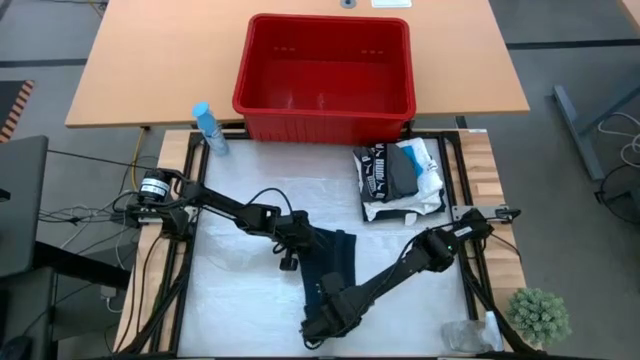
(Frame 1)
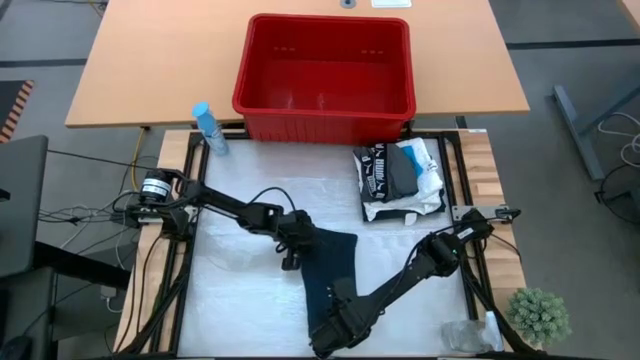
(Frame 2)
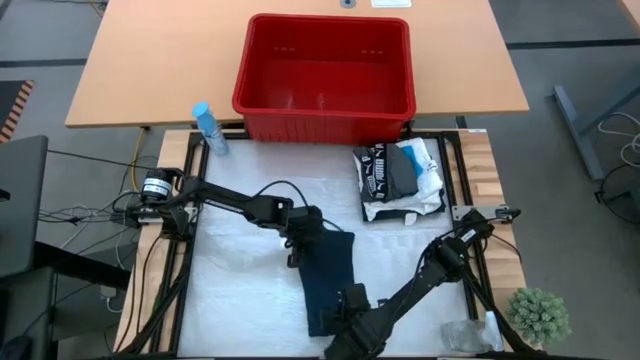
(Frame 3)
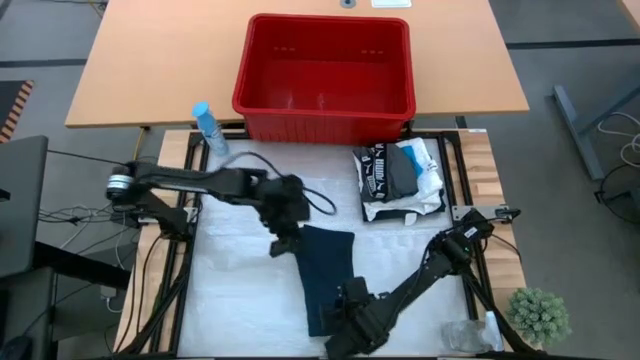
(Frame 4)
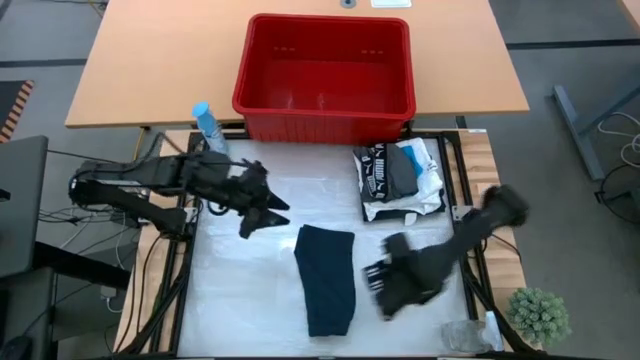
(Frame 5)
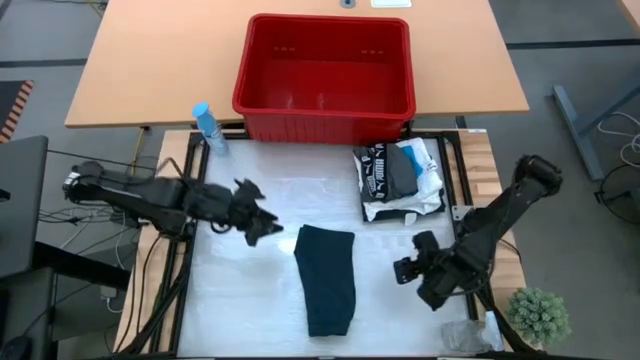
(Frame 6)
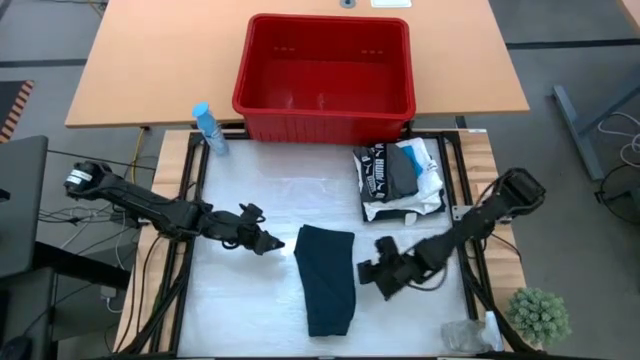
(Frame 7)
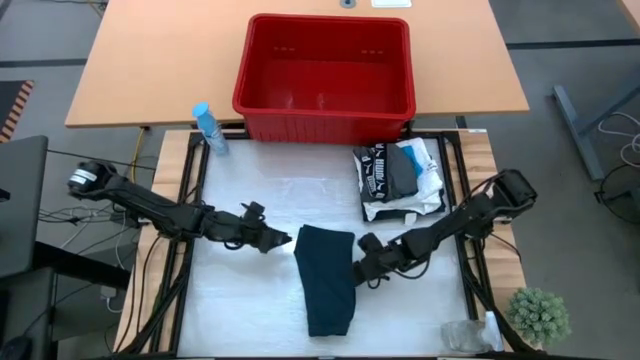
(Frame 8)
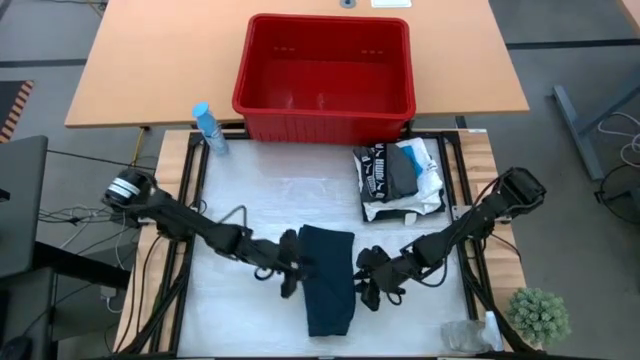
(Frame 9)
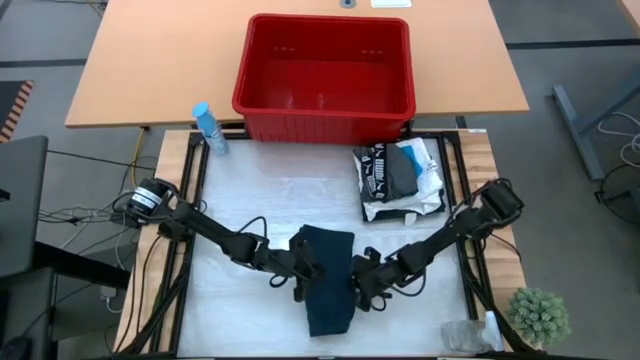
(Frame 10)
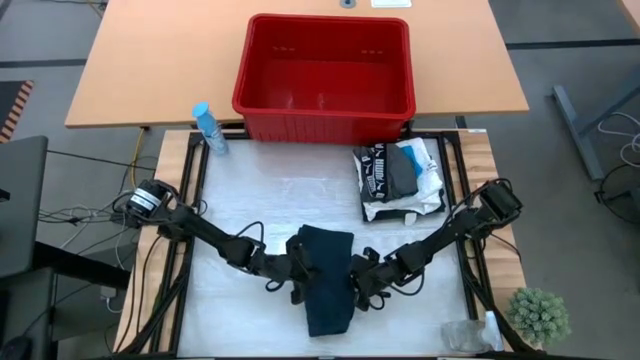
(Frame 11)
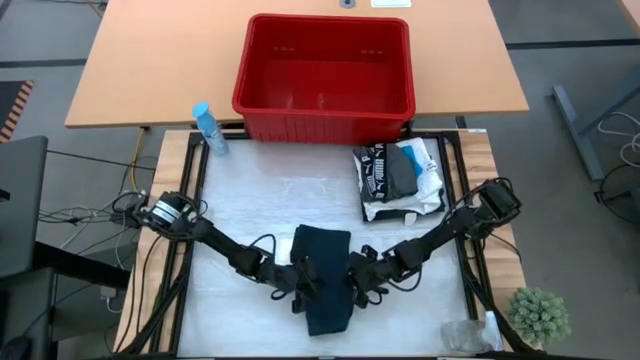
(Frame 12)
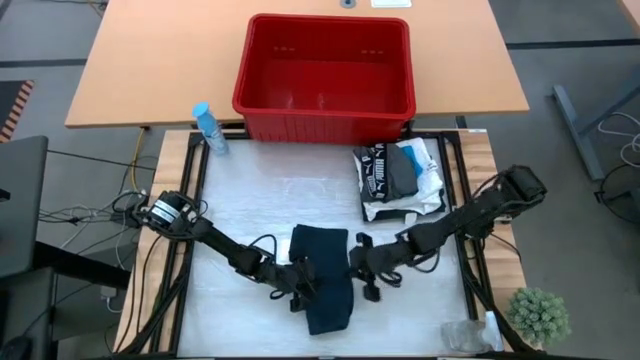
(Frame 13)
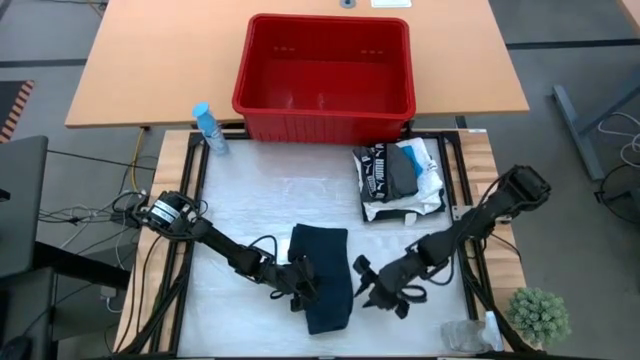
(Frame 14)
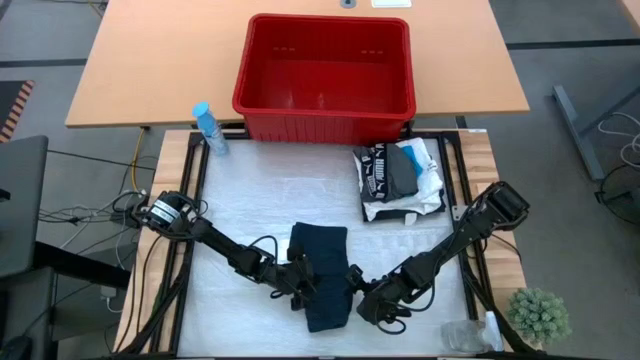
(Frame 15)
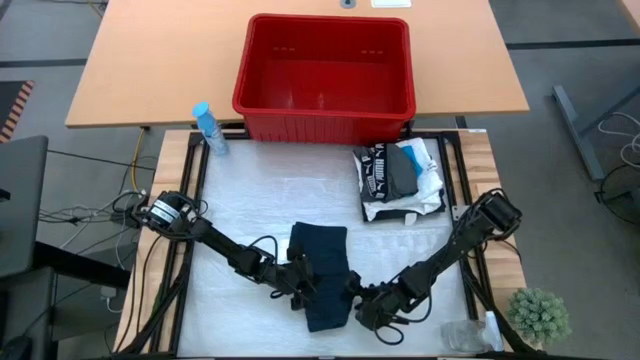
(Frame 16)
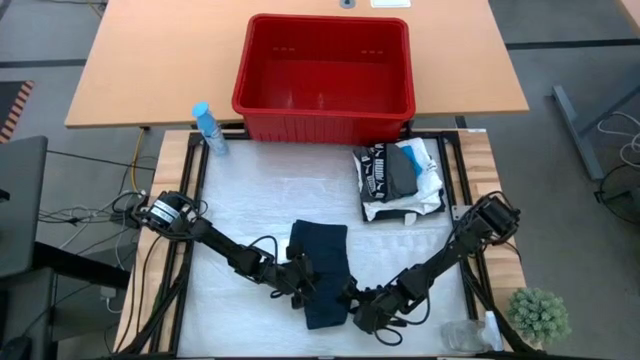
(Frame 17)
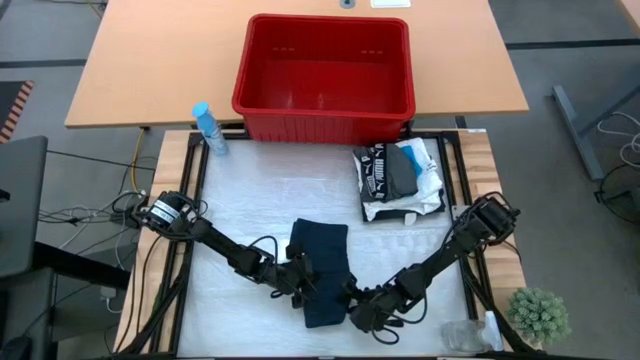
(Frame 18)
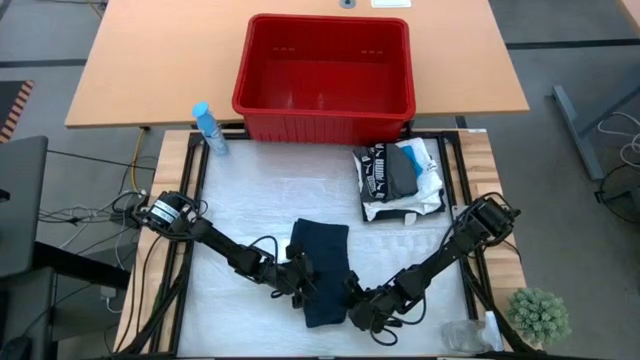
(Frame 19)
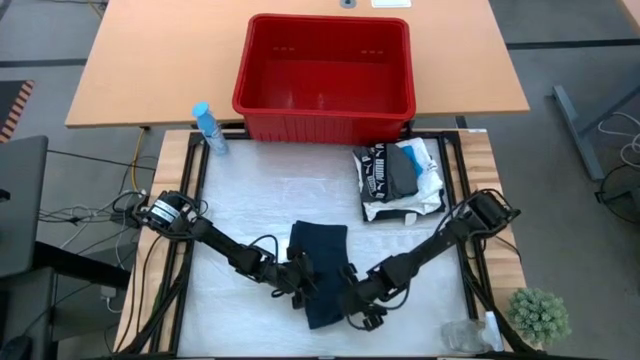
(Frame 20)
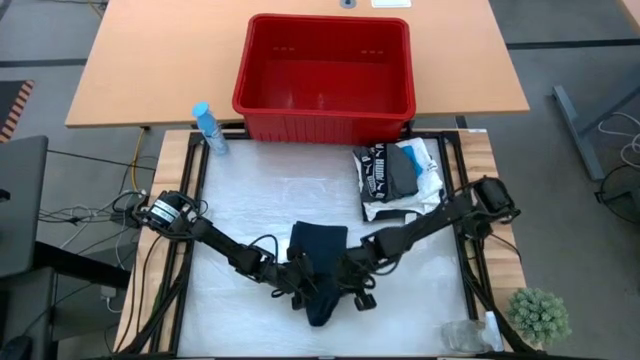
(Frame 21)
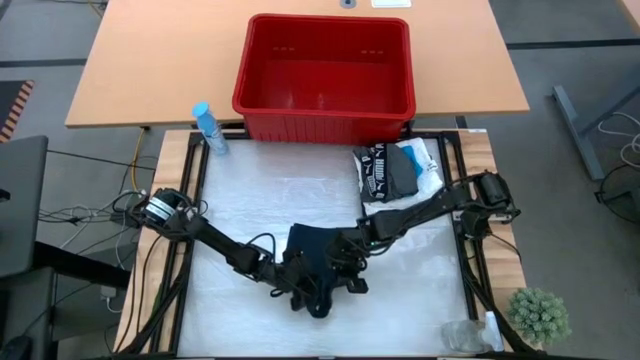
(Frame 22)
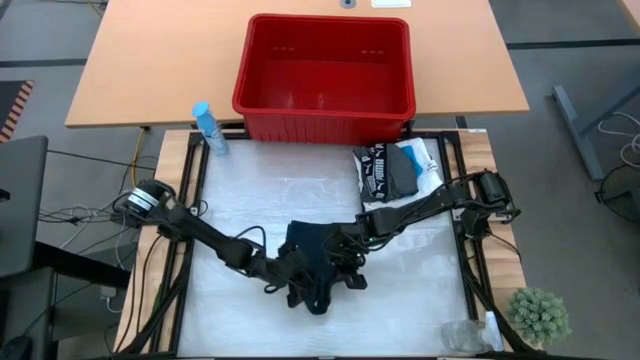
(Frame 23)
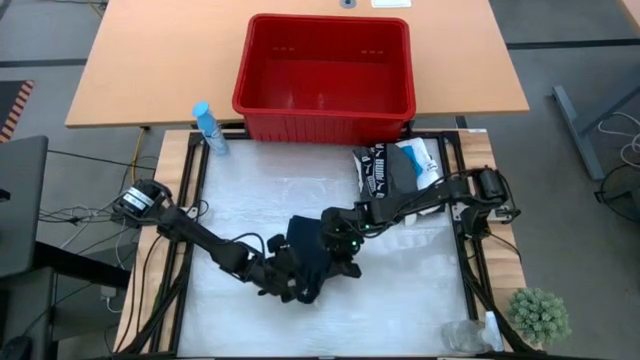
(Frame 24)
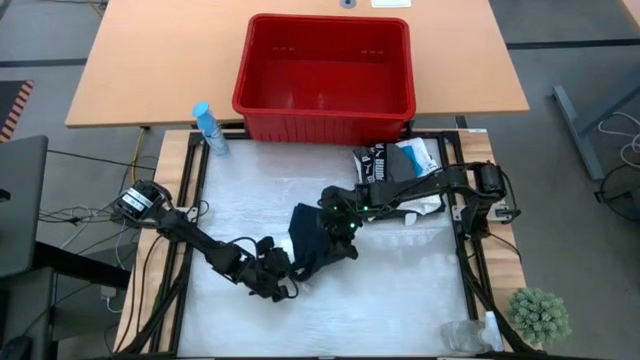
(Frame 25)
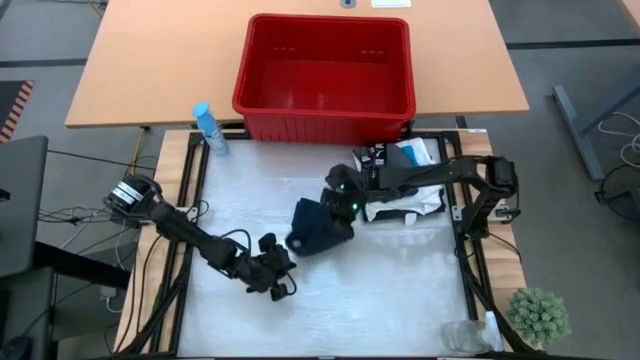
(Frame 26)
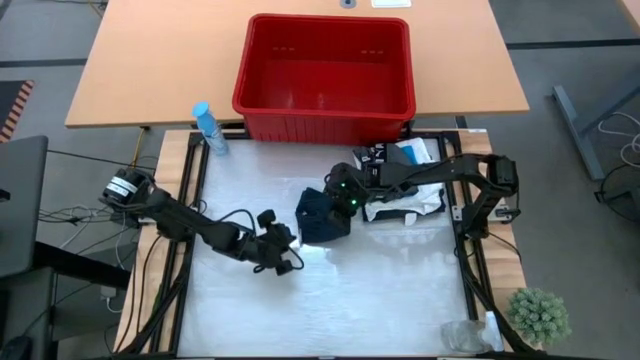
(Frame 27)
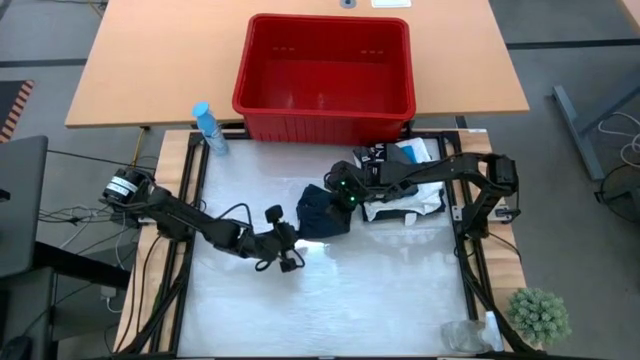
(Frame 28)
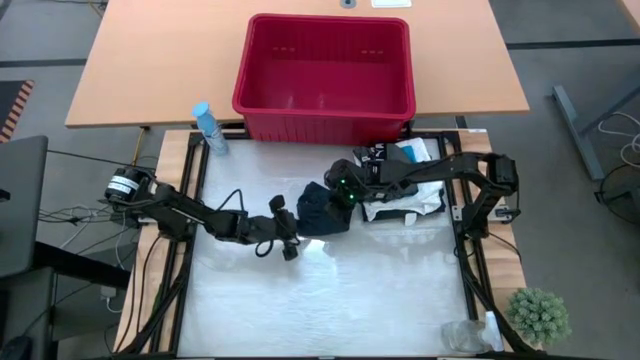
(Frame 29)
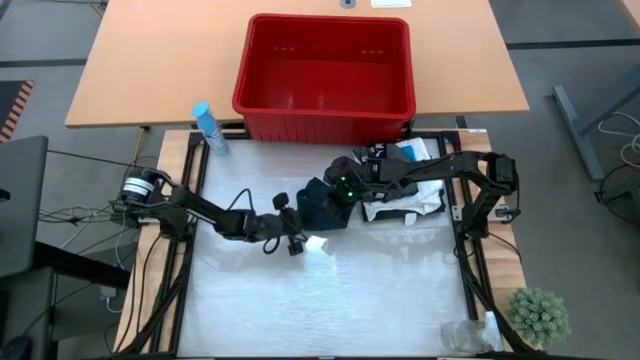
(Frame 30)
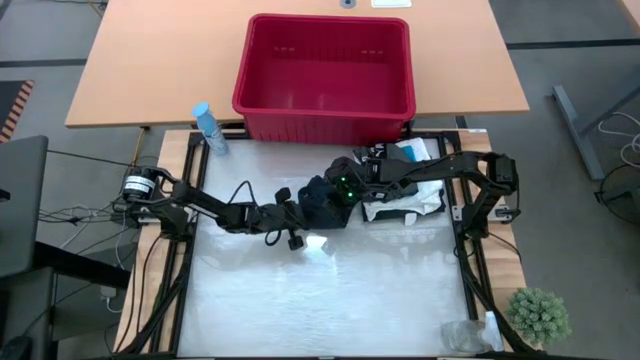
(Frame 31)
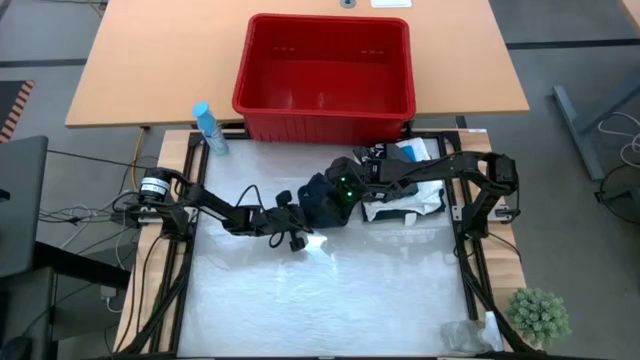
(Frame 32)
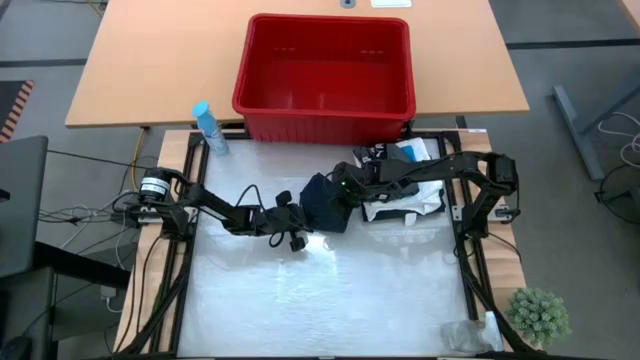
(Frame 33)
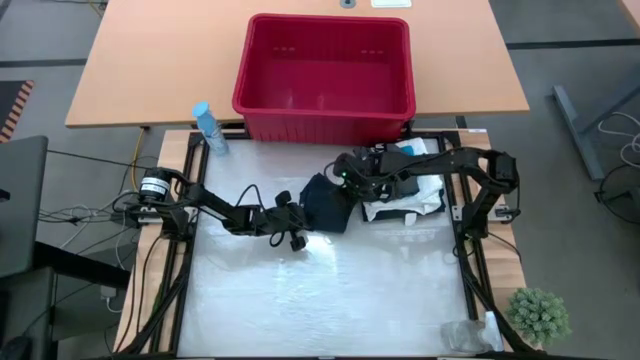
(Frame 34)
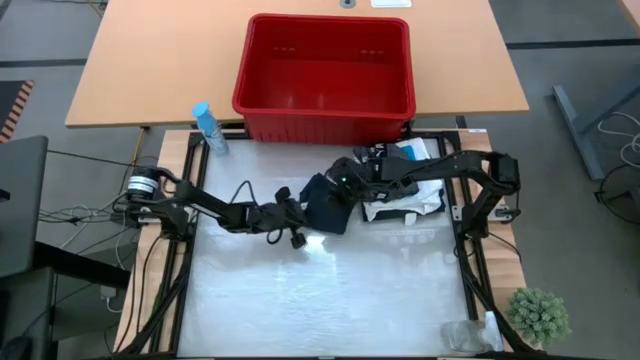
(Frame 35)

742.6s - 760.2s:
Task: Fold laundry
Fold the black shorts

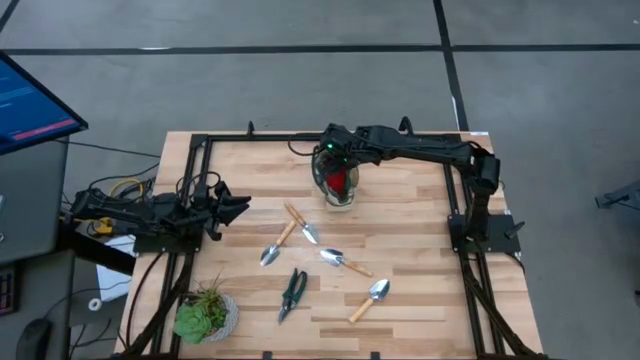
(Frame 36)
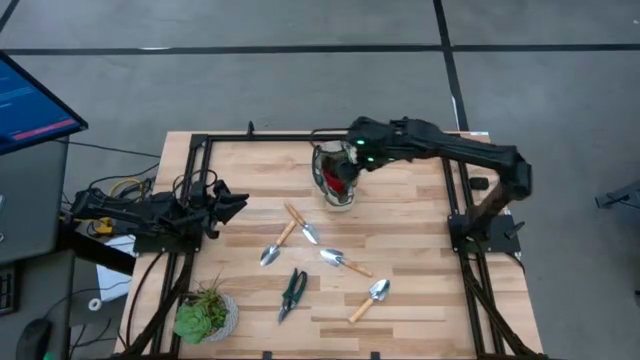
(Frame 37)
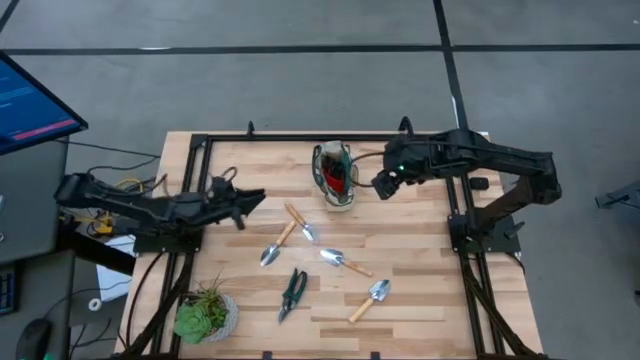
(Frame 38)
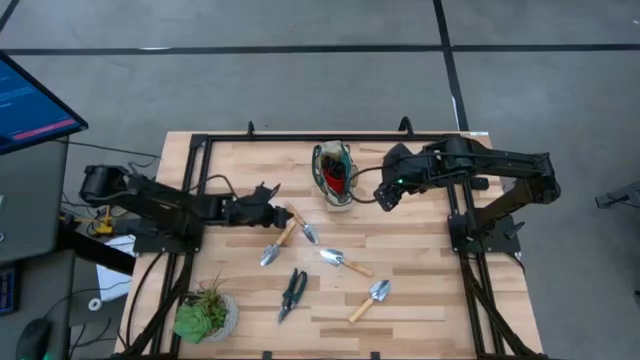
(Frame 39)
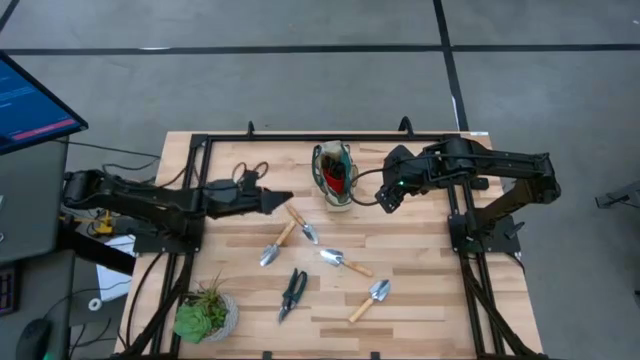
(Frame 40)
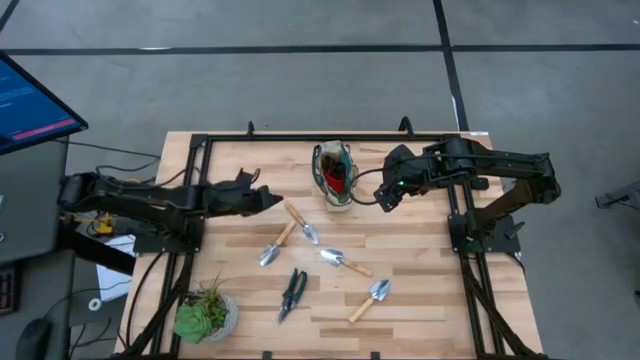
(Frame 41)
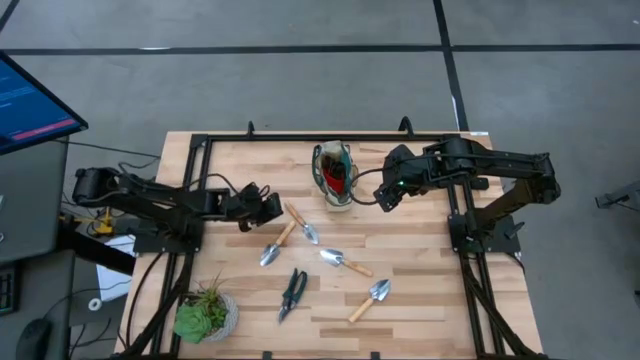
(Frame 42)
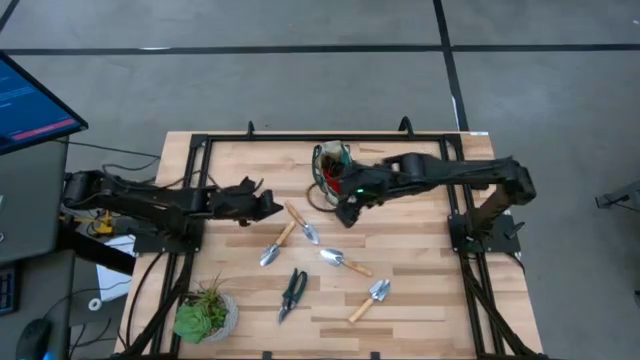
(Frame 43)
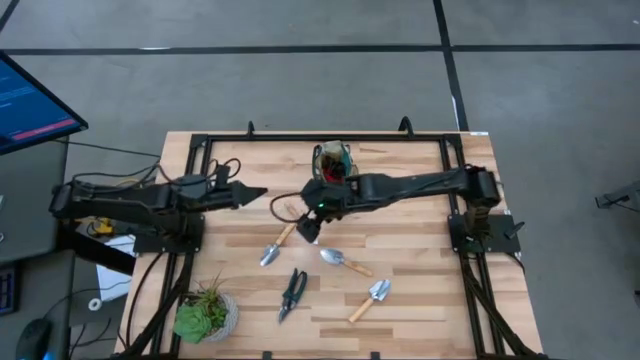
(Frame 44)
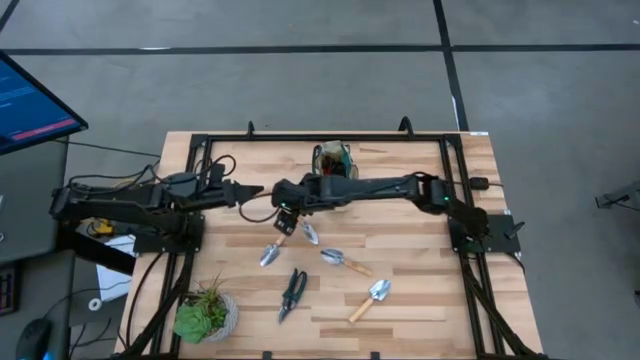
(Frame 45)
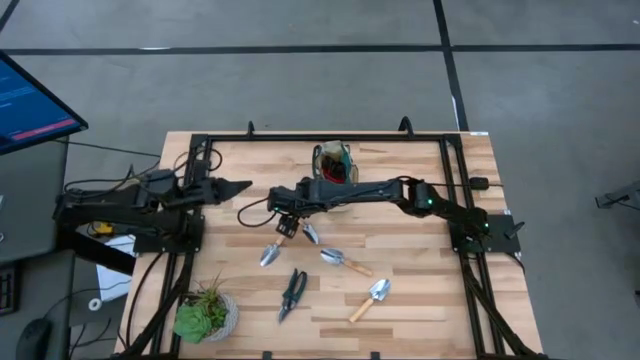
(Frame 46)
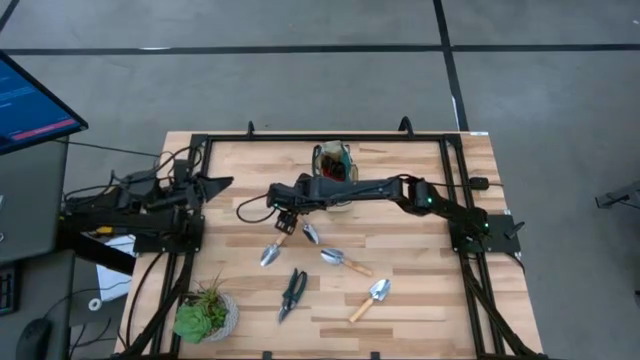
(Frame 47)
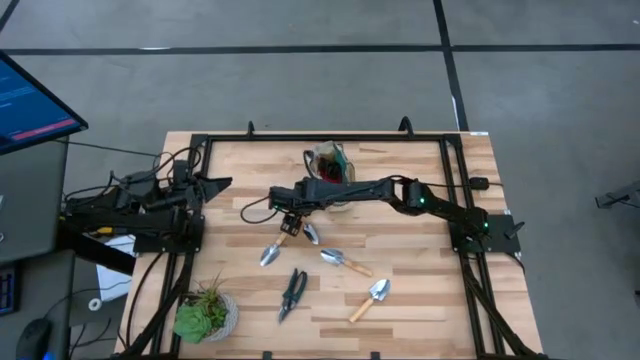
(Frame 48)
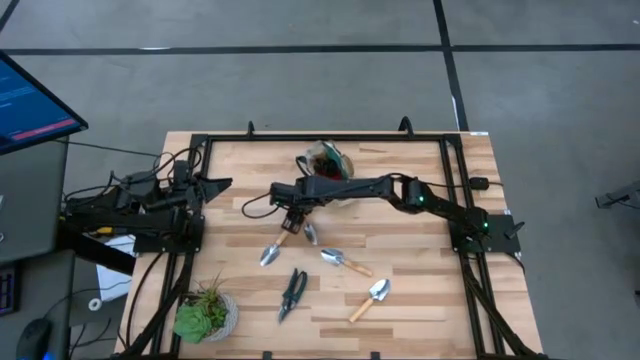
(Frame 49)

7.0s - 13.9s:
Task: Pick & Place Garden tools in Gardening bag
Put the trowel into the gardening bag
